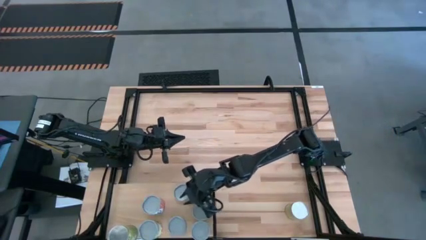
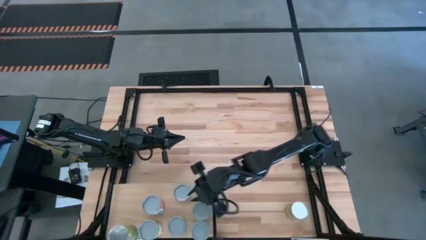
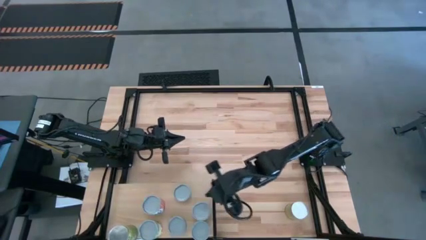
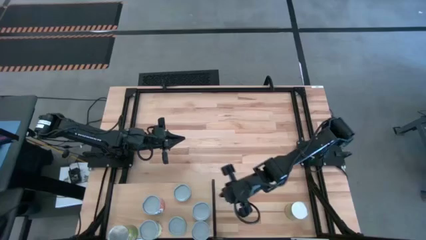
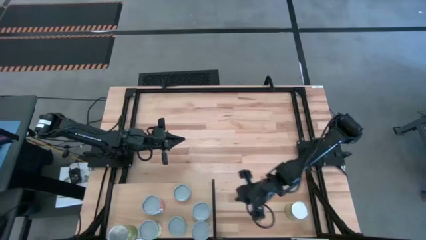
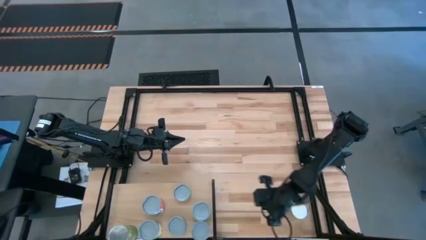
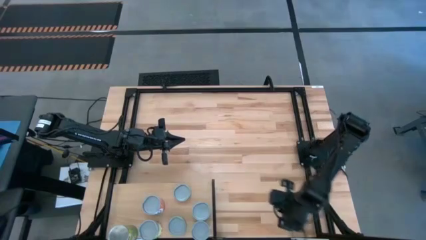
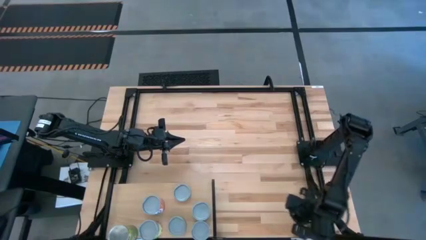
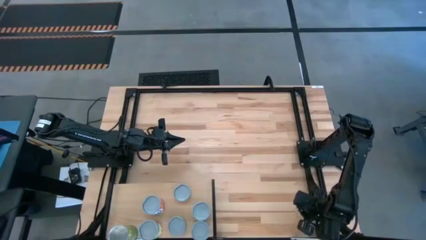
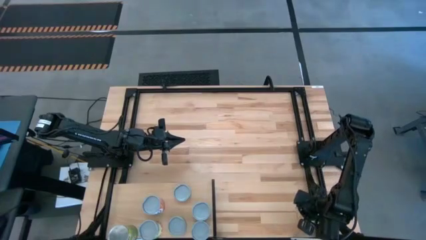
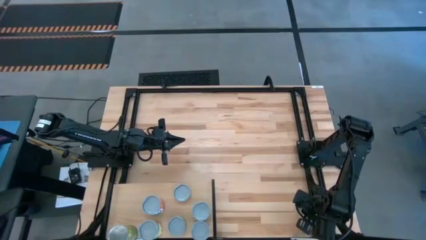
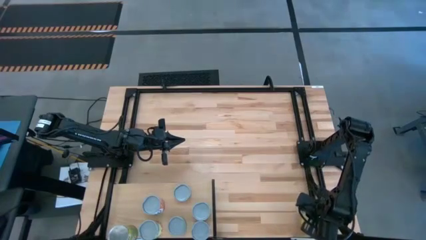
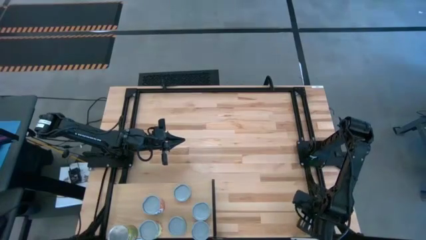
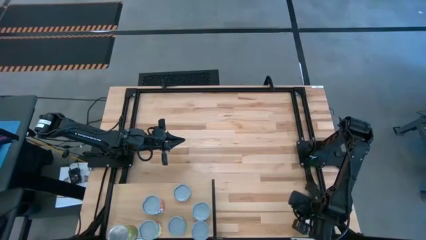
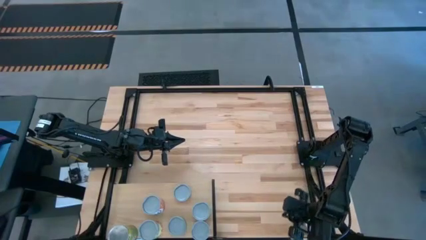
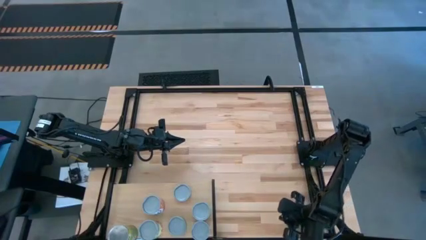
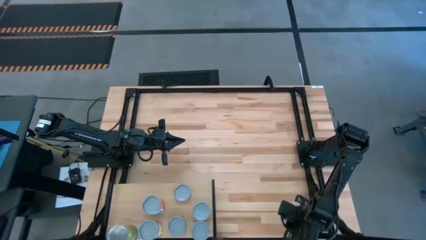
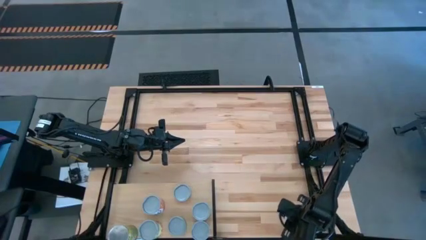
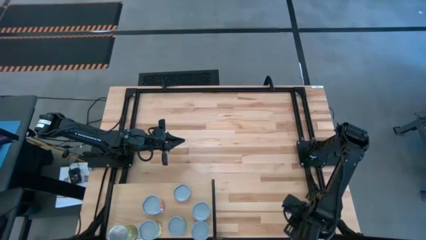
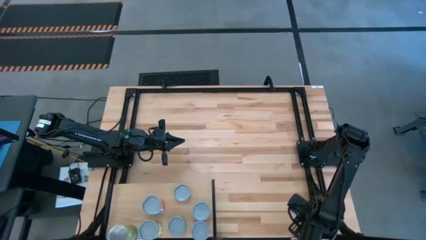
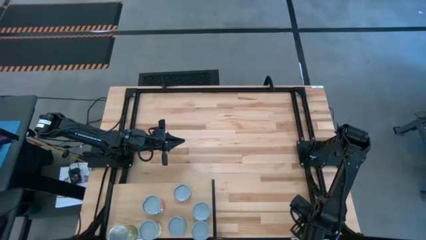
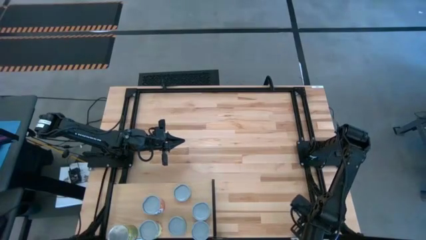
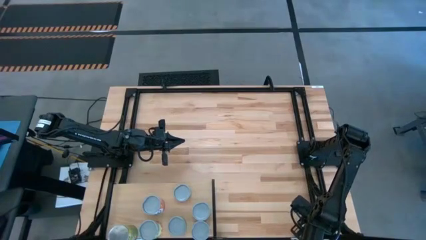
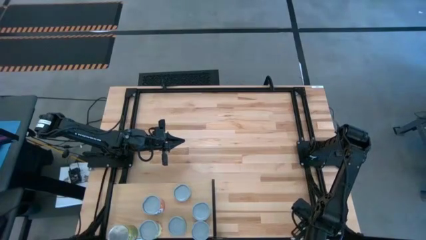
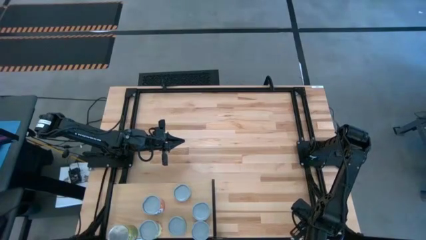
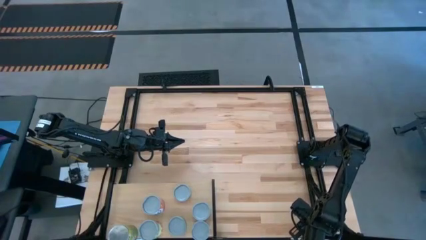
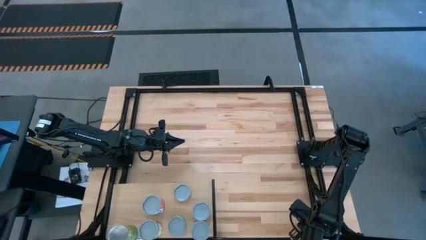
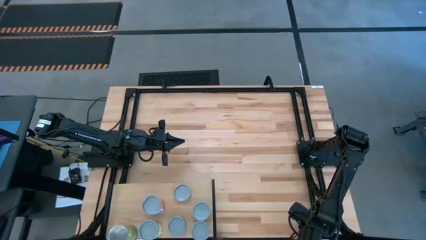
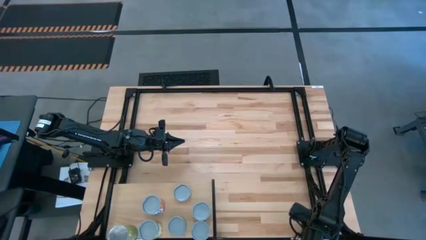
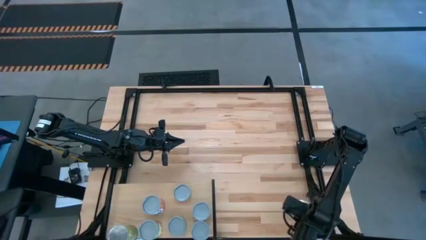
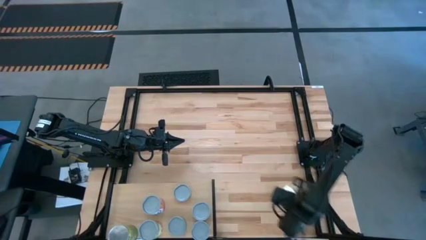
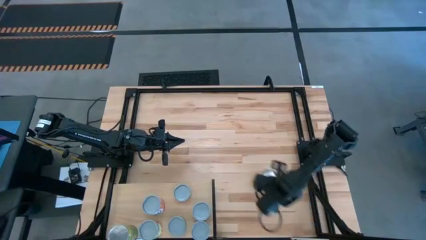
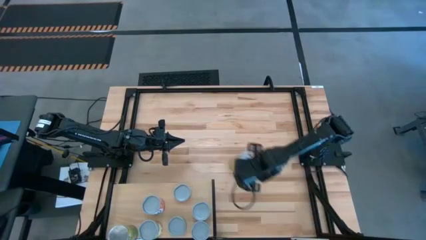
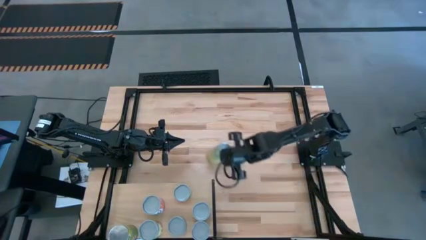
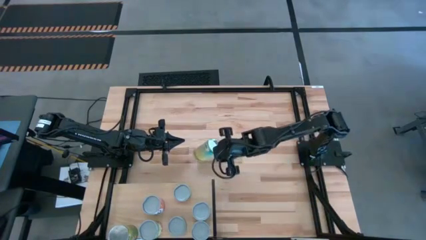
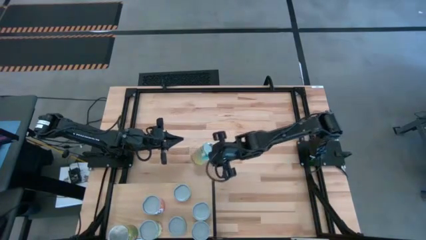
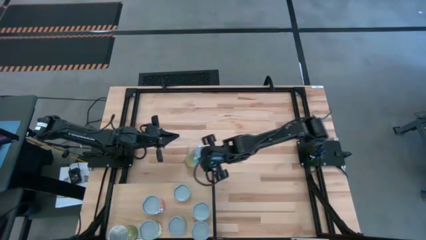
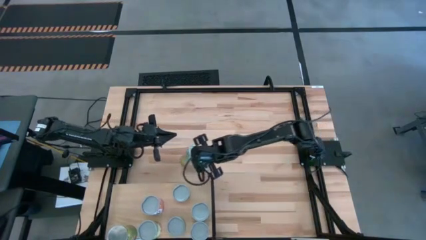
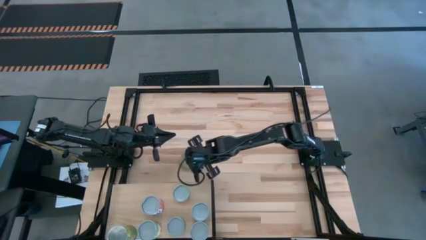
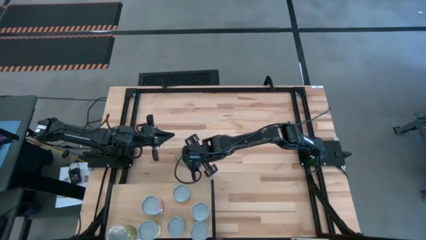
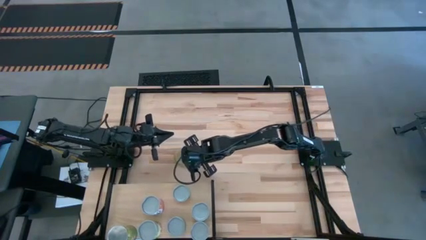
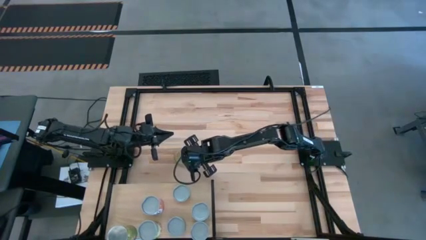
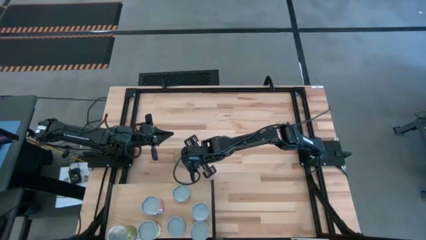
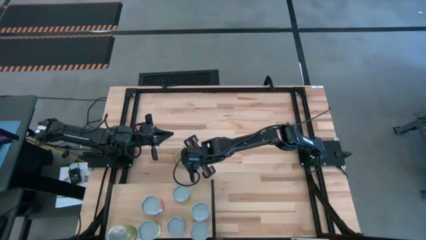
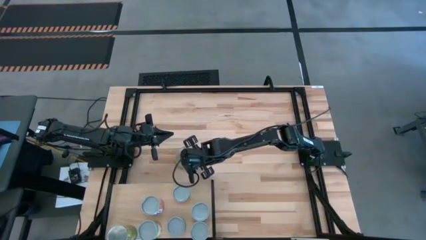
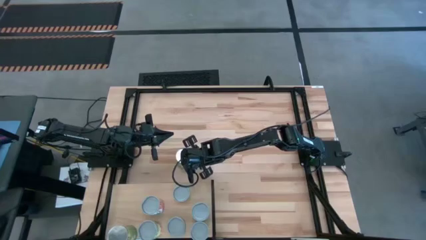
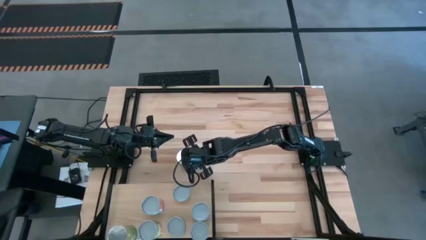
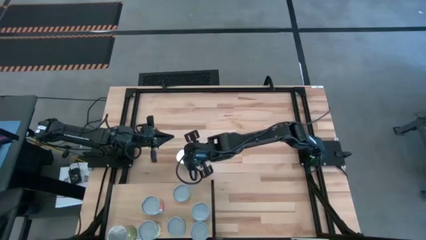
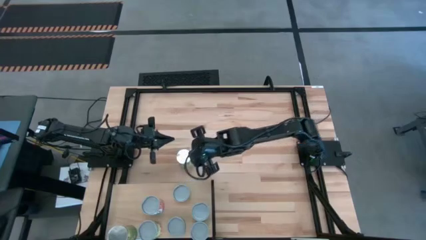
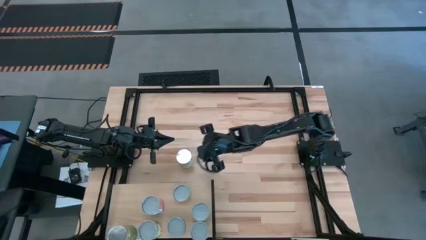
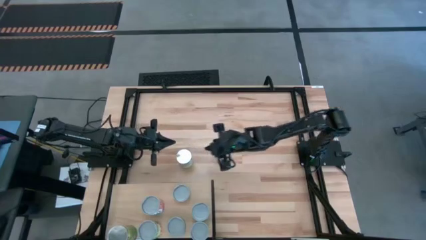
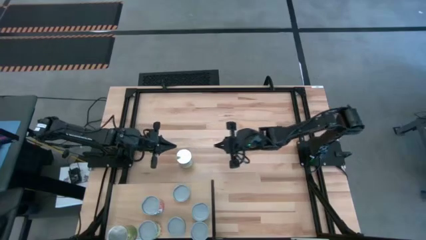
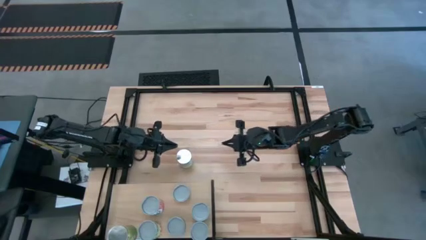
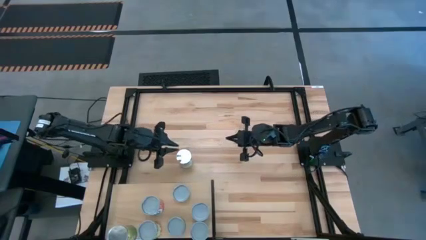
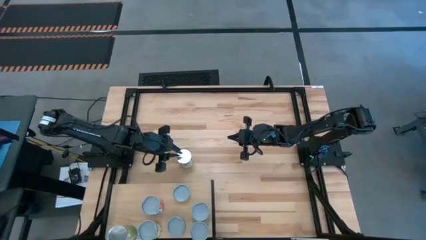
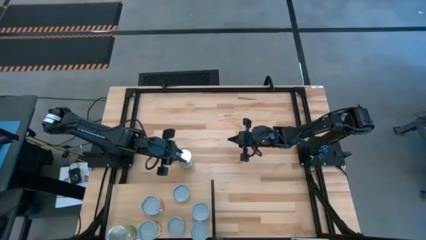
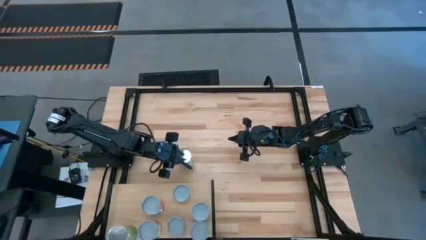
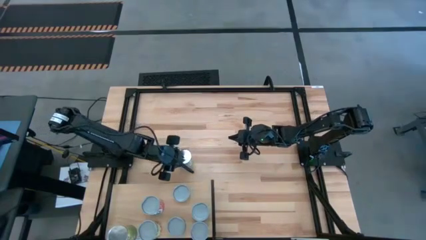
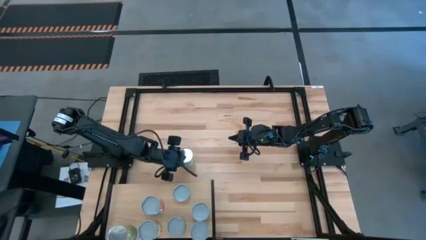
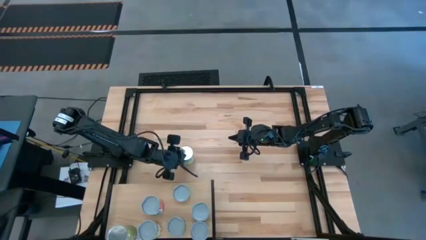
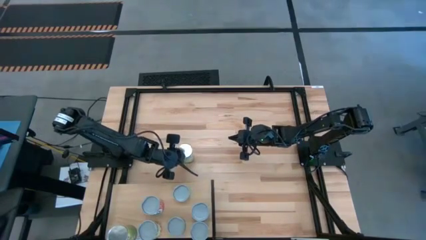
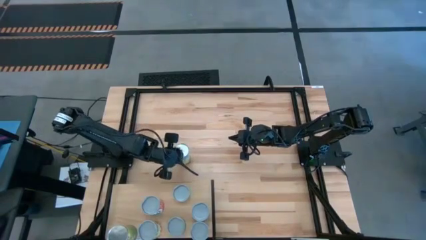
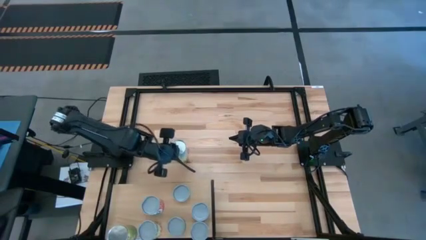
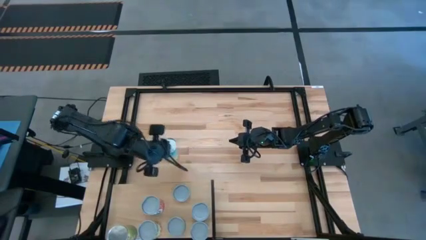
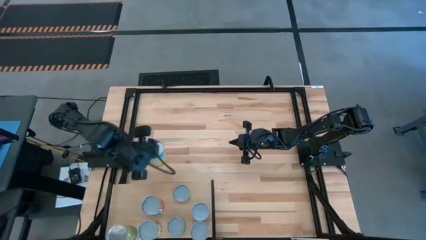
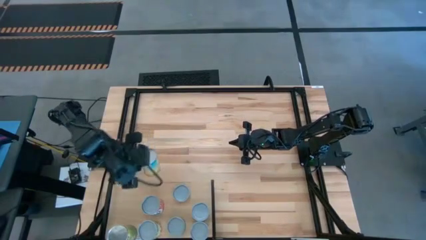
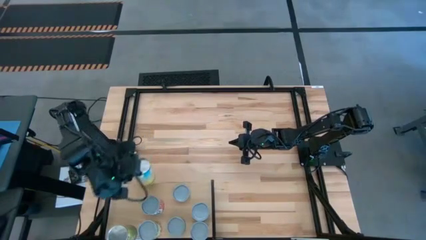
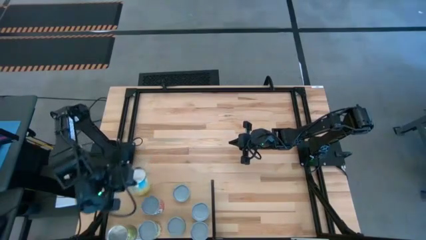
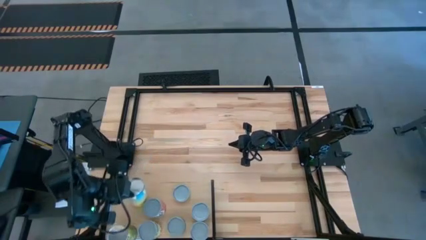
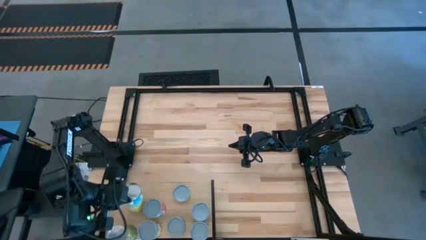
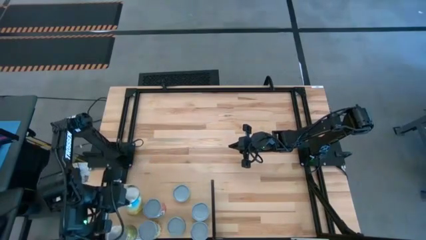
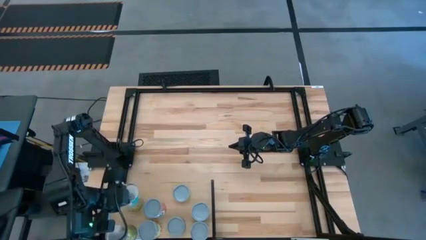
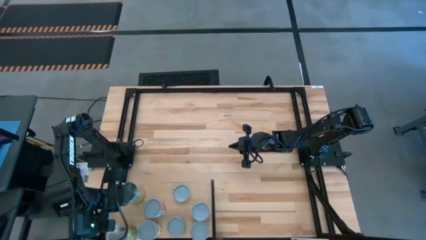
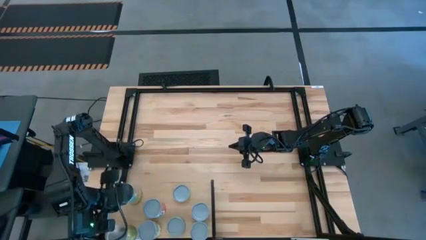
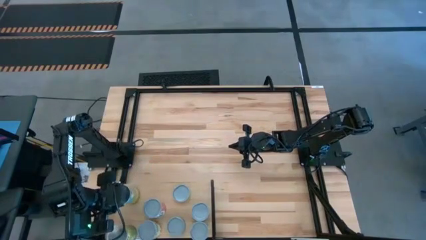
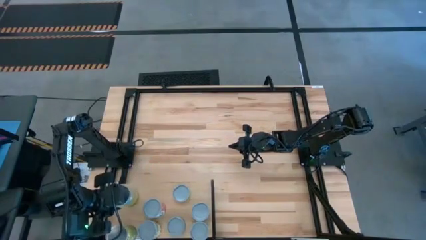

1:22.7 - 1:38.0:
Task: Pick and place cans onto a shelf
Put the canned carrots on the shelf
